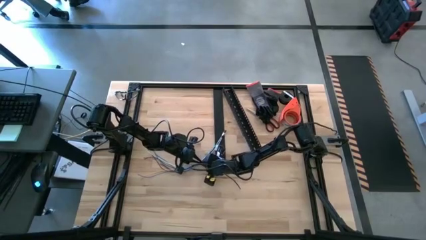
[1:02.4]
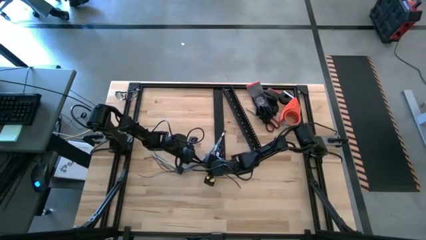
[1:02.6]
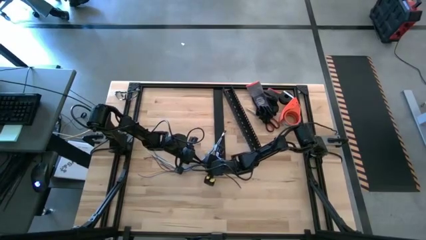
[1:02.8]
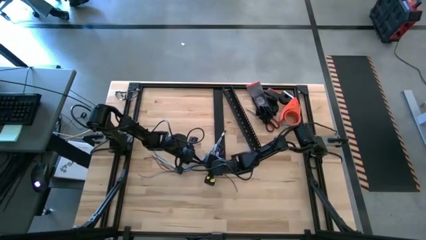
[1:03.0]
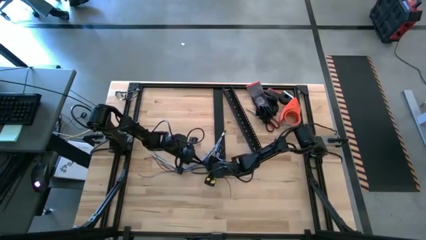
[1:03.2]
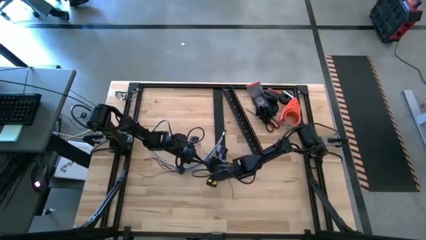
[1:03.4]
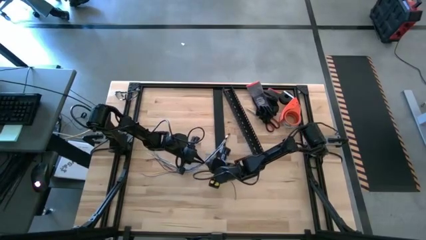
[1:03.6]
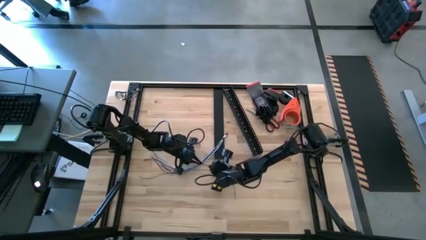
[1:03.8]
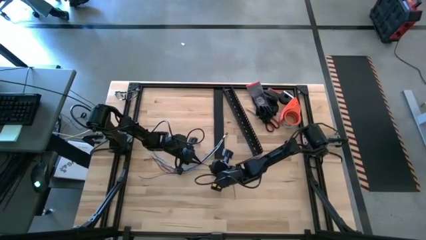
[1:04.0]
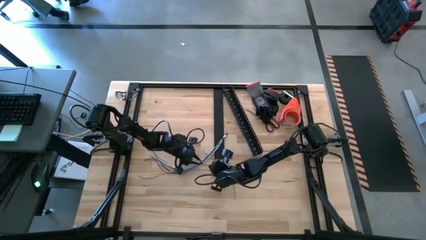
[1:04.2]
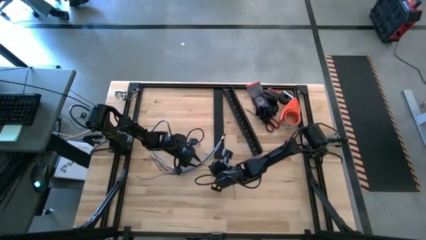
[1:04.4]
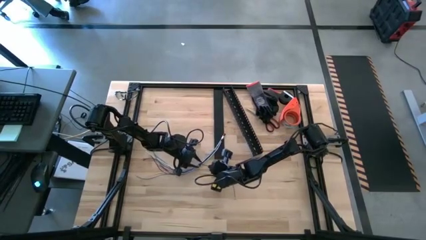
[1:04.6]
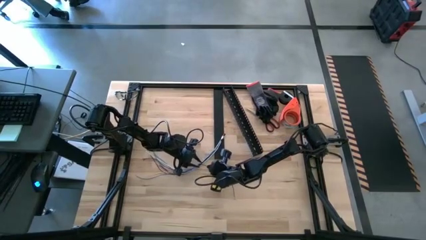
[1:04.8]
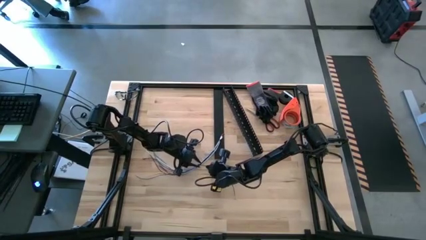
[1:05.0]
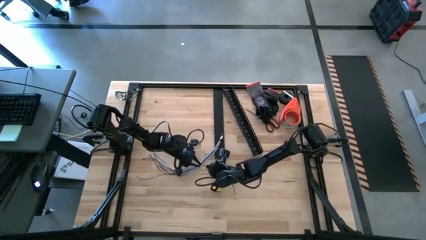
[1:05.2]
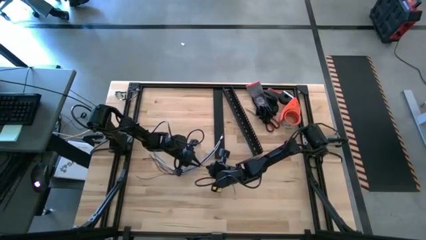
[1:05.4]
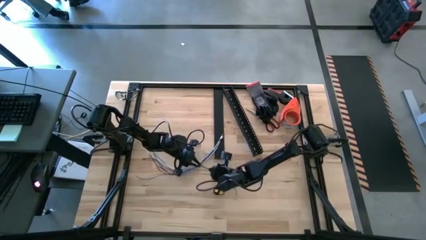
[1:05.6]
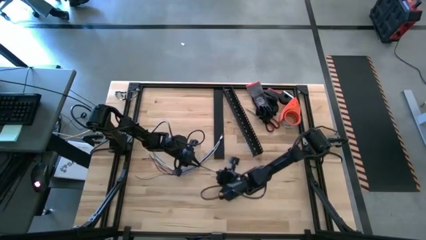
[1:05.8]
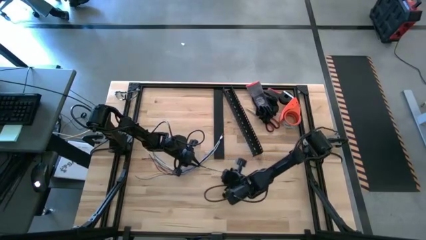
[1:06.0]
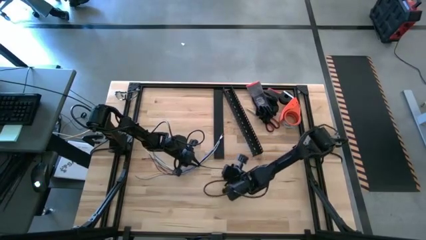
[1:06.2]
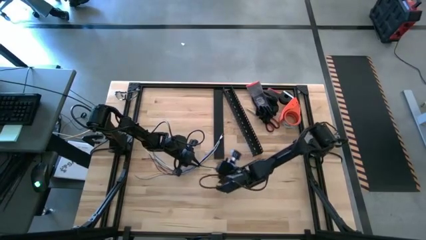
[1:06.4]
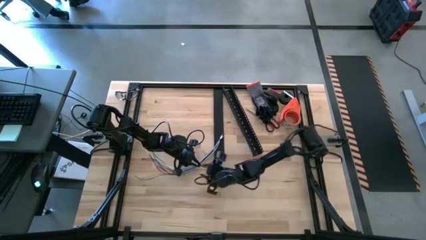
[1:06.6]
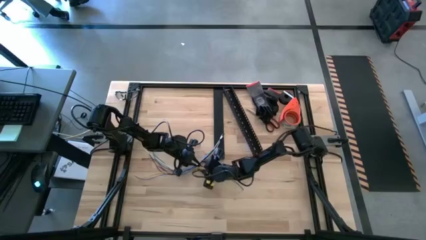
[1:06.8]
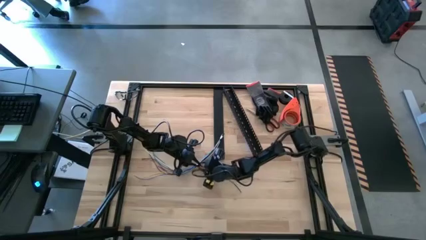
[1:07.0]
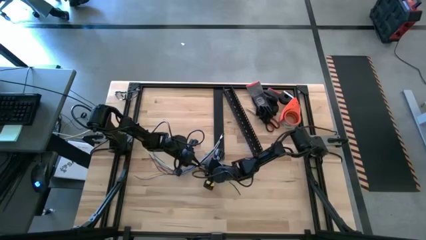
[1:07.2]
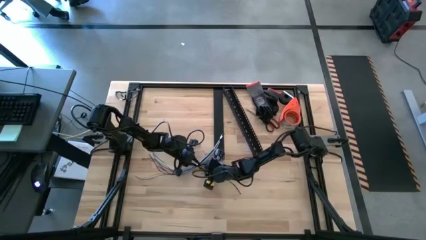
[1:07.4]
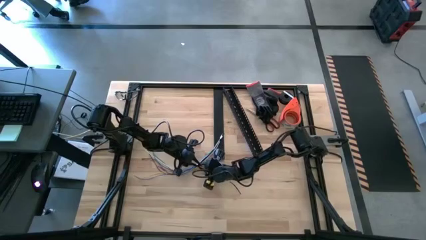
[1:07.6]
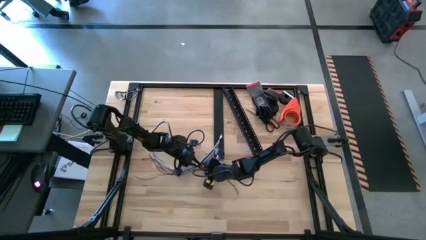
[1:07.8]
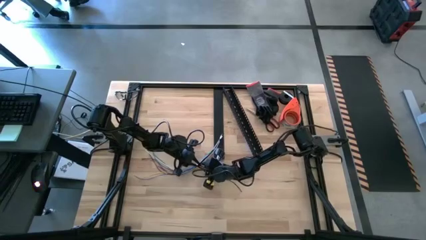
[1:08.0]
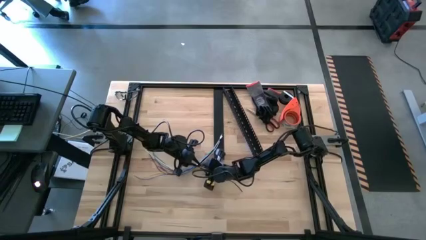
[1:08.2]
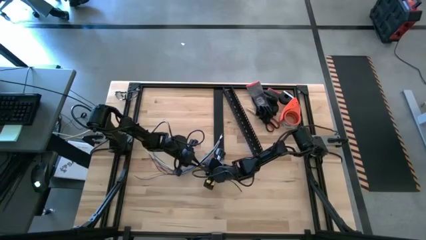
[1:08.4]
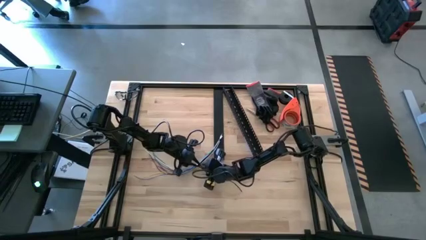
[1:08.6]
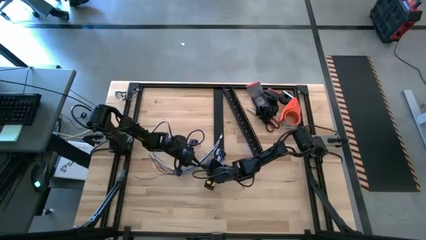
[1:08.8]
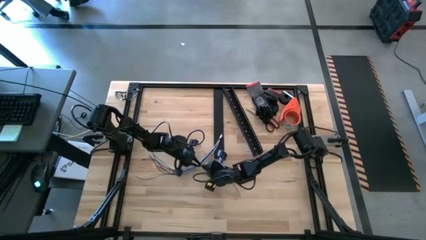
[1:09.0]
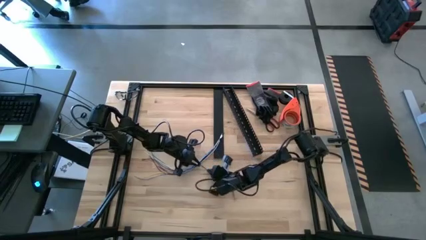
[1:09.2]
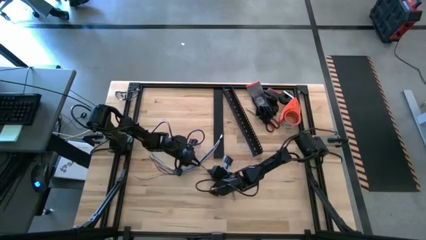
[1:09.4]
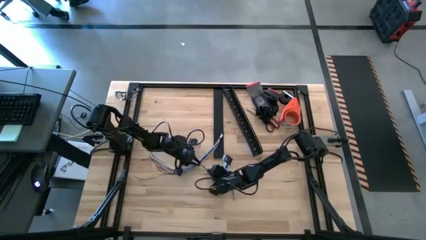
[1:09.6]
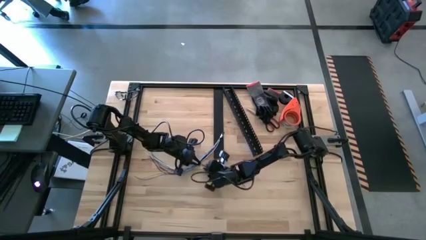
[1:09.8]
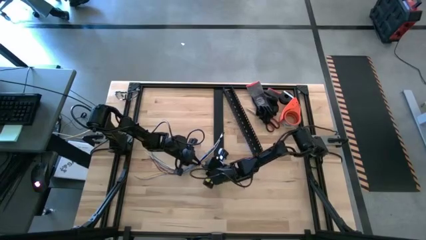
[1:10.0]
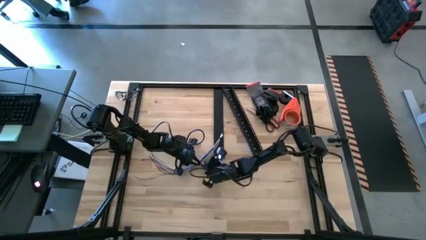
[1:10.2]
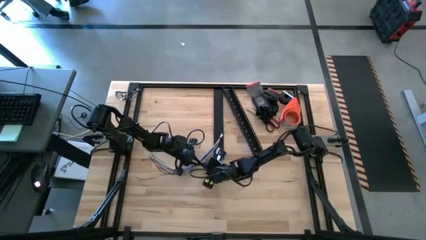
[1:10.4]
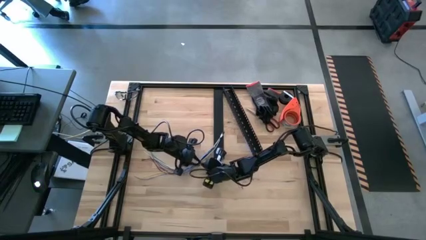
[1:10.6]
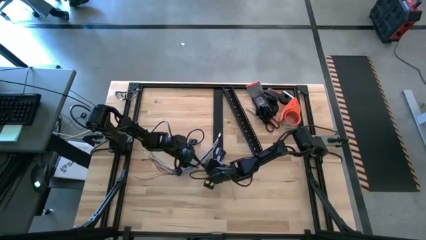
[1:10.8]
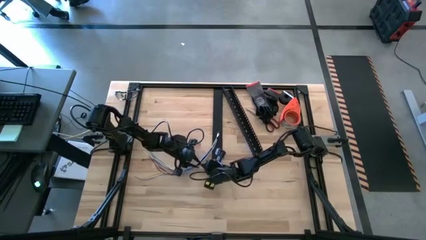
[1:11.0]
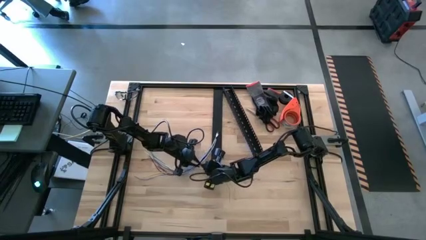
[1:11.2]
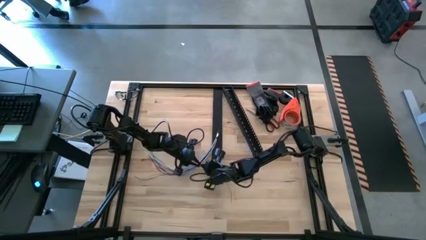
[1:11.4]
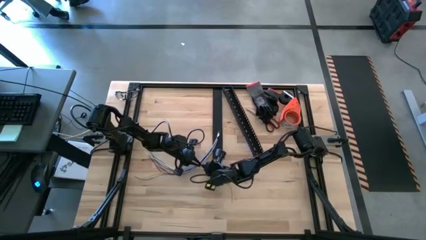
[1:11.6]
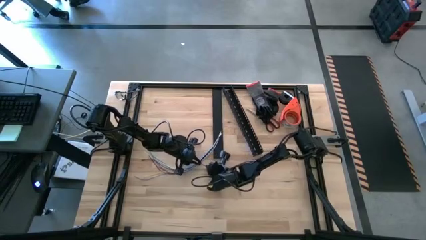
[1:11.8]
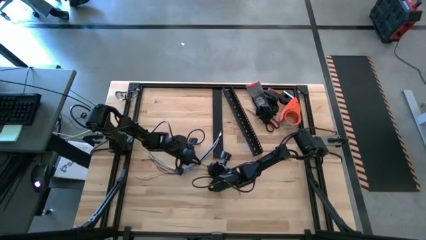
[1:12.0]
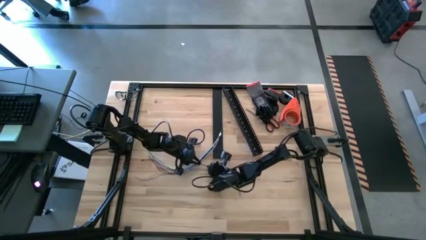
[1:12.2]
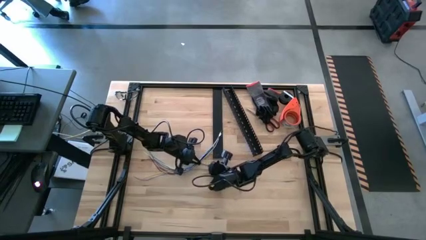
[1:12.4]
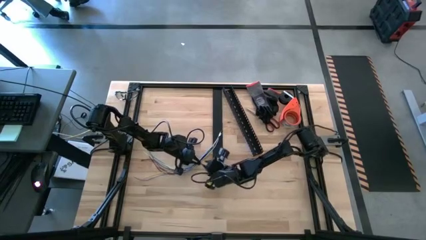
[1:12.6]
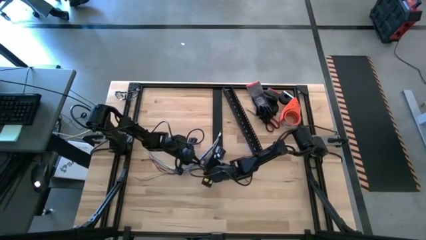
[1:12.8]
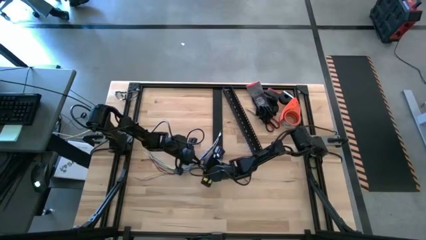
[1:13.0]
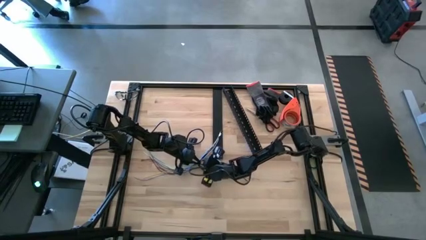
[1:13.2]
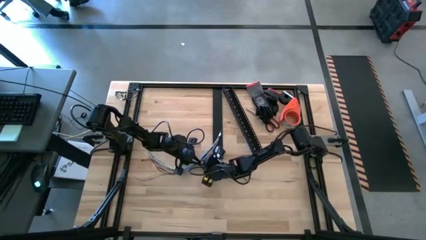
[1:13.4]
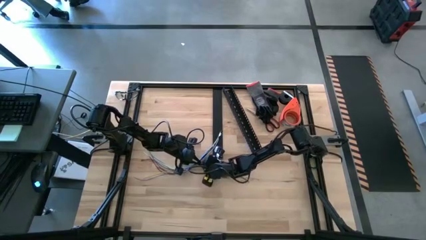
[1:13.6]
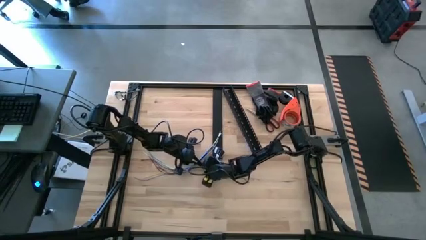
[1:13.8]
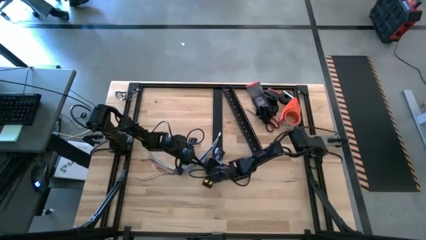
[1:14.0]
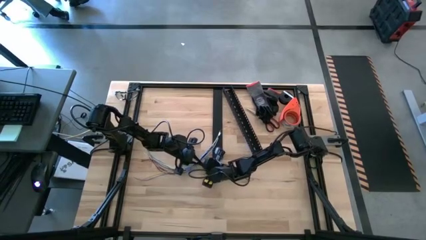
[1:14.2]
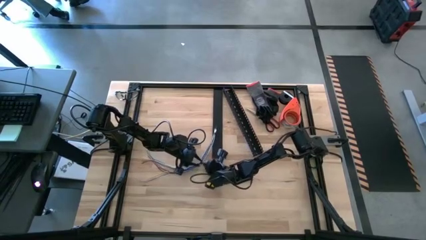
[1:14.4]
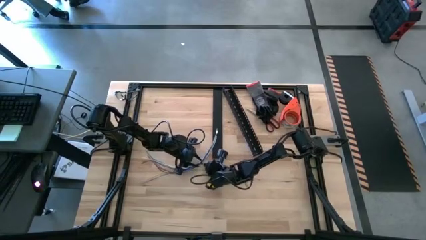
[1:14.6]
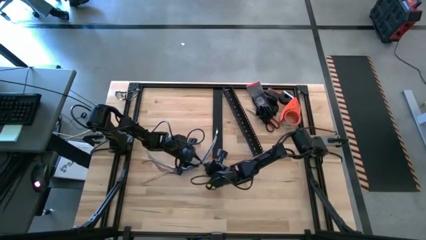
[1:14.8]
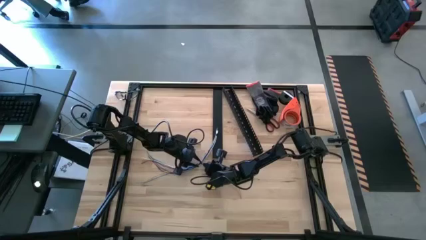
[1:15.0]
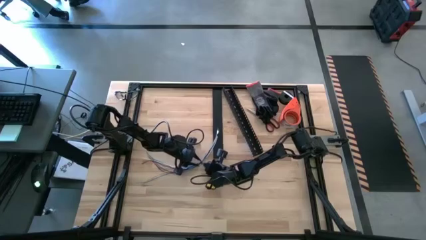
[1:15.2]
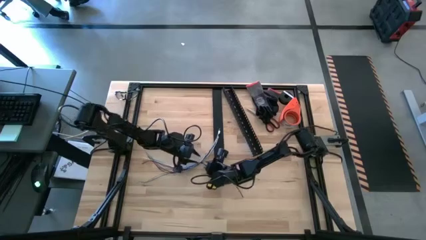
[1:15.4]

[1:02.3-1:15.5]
Task: Ziptie cables
Wrap the black zip tie around the cable wires
